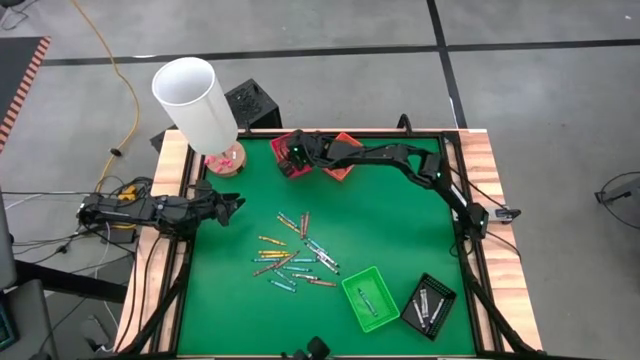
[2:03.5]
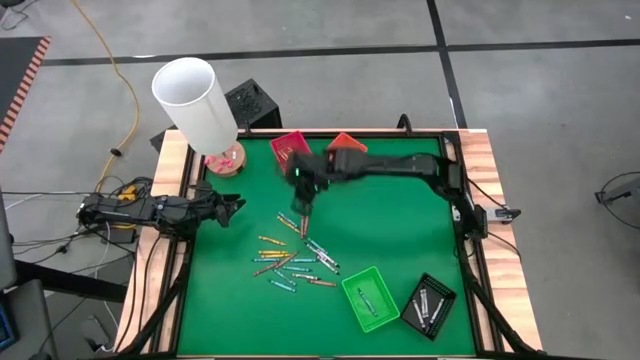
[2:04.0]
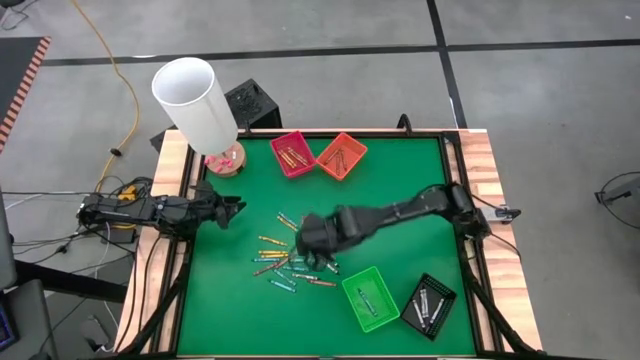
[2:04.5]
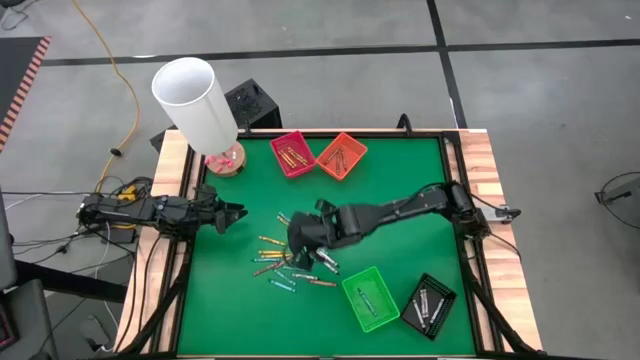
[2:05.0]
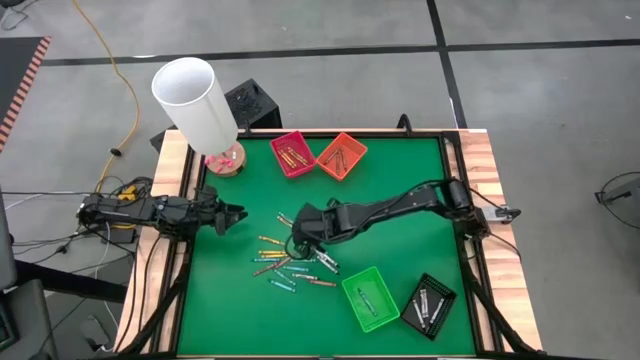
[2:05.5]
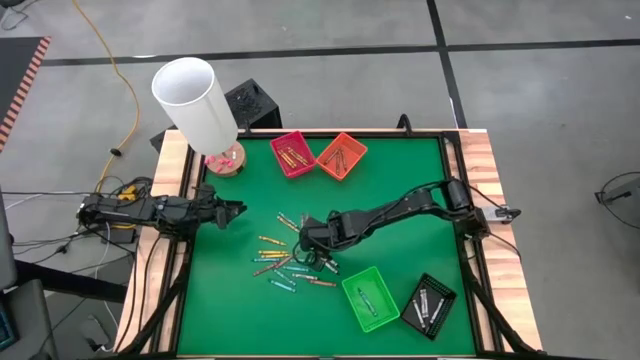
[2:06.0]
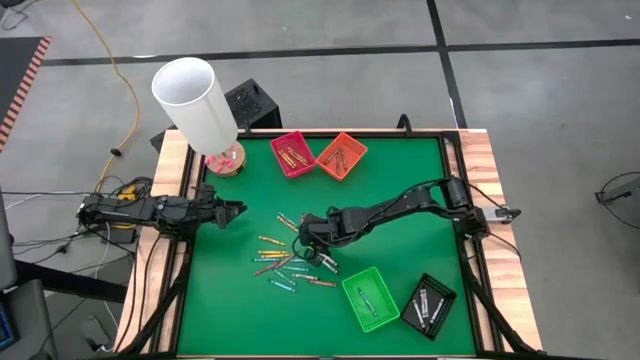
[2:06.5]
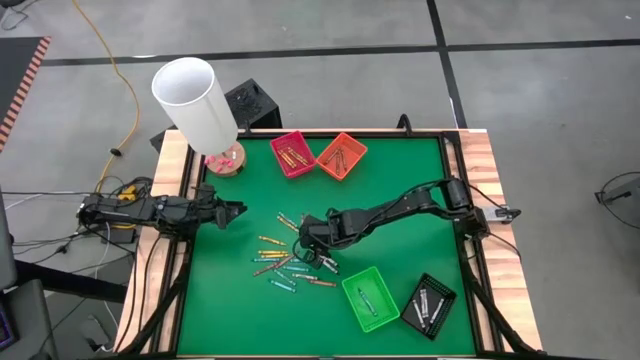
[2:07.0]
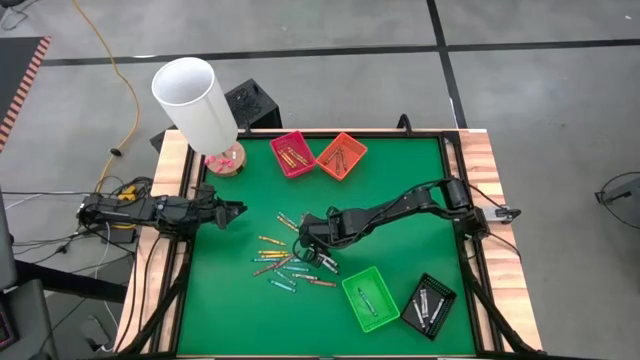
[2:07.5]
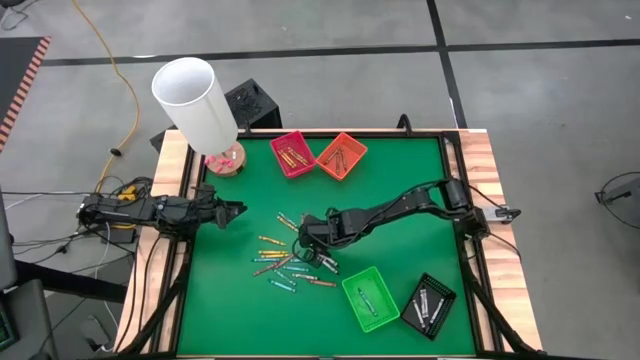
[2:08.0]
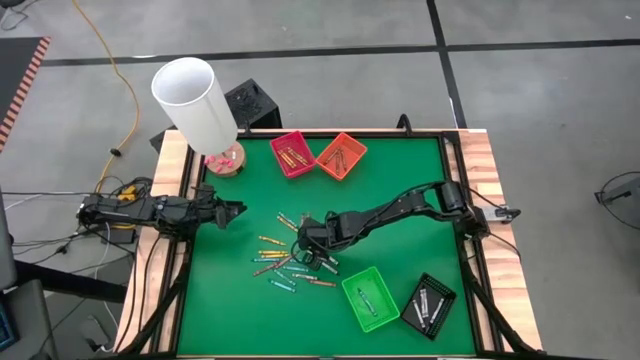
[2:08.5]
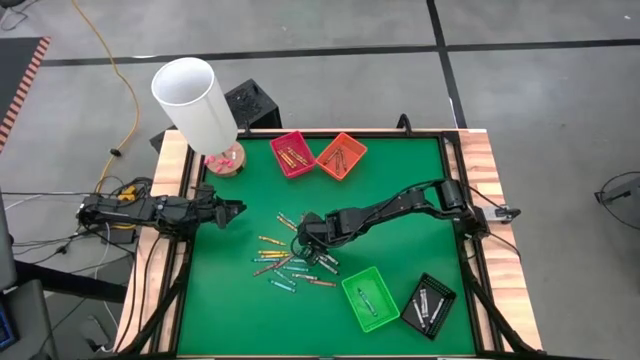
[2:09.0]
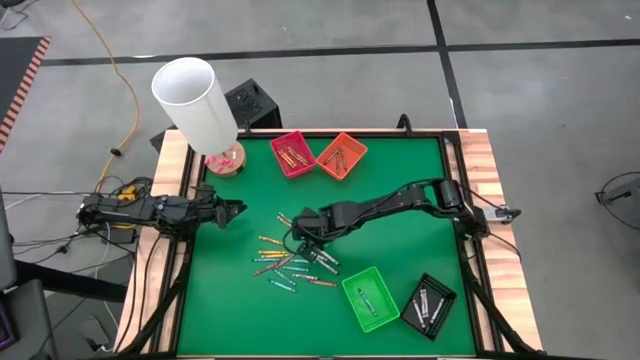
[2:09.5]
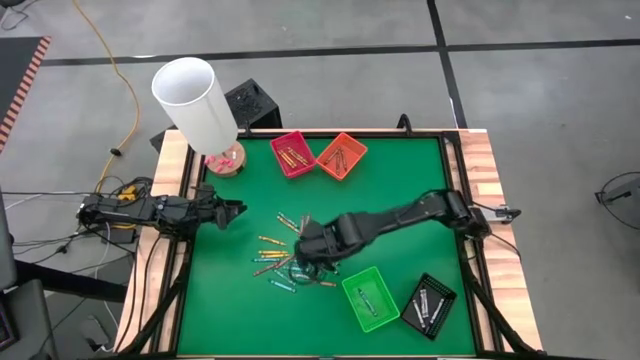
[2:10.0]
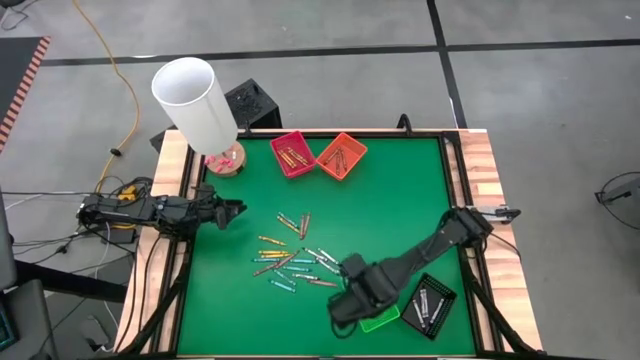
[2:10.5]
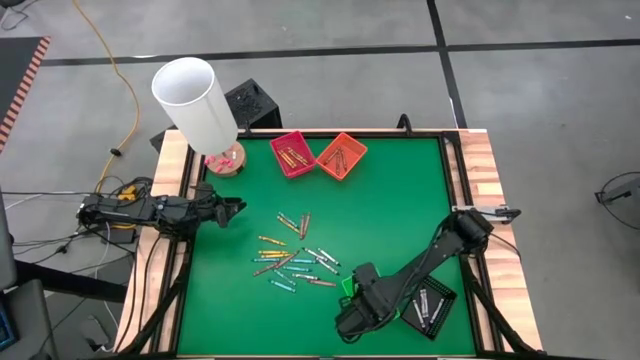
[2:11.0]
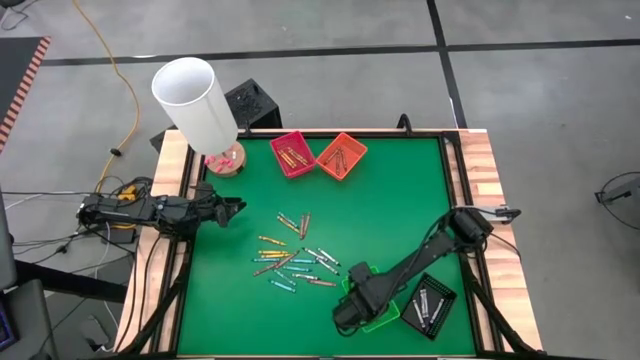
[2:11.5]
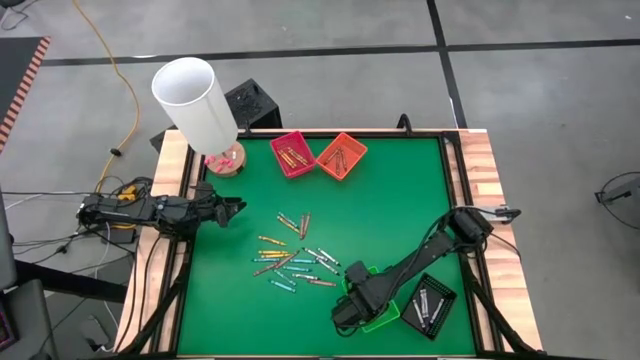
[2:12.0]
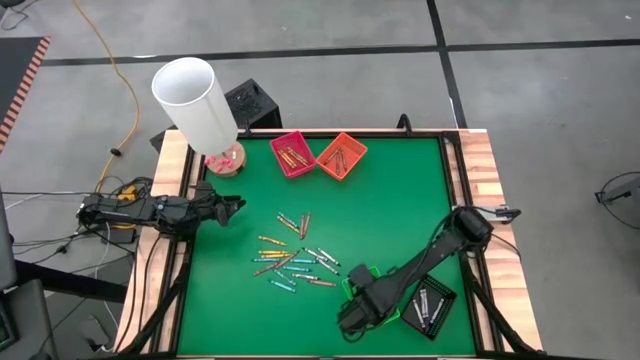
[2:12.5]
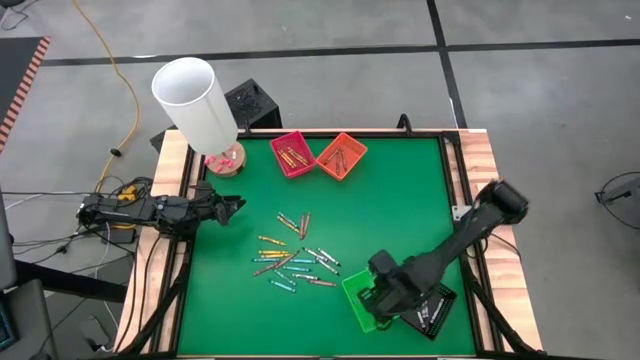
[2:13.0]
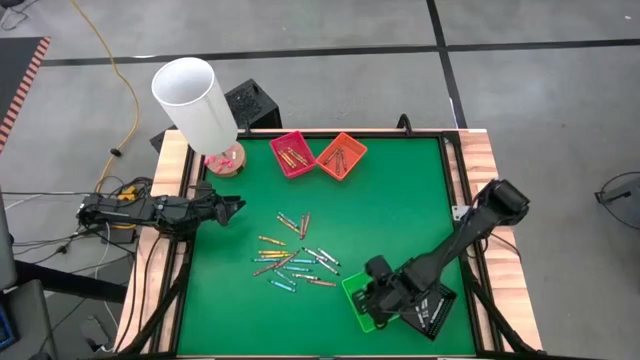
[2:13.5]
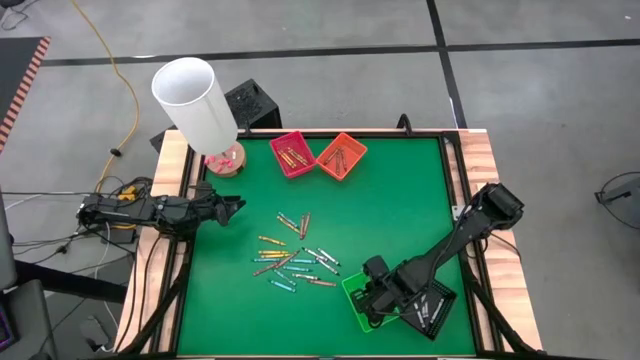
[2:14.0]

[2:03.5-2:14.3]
Task: Sort crayons
Put the green crayon into the green bin

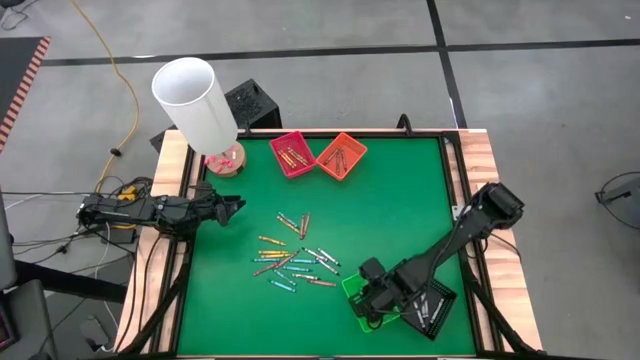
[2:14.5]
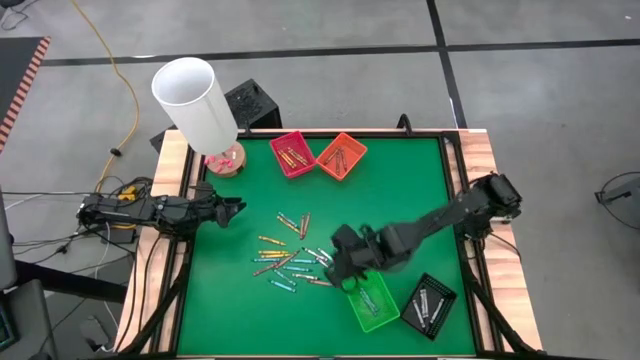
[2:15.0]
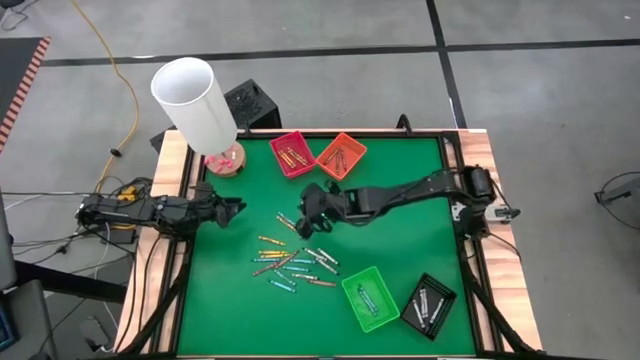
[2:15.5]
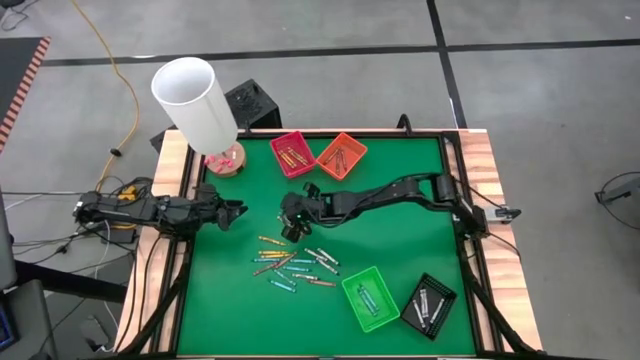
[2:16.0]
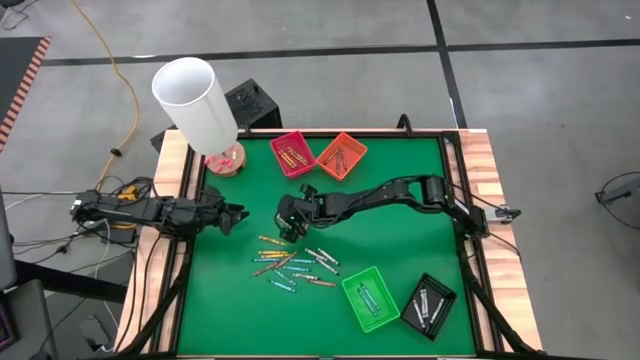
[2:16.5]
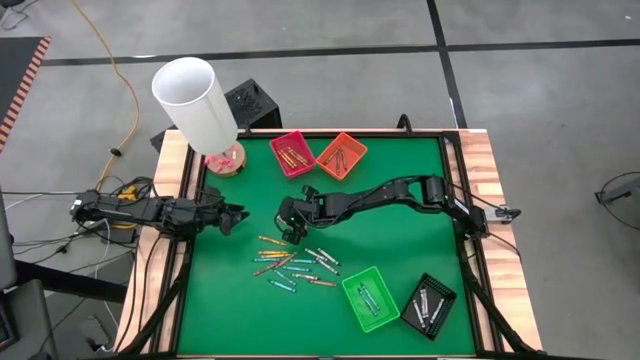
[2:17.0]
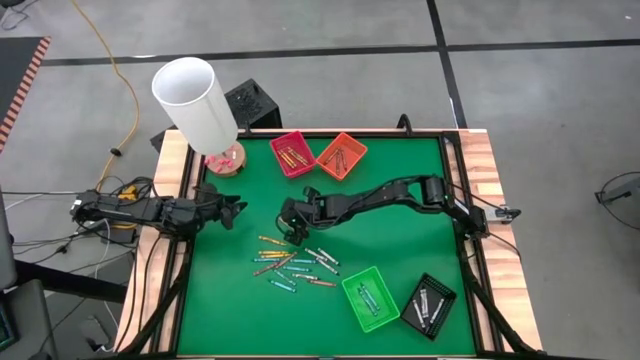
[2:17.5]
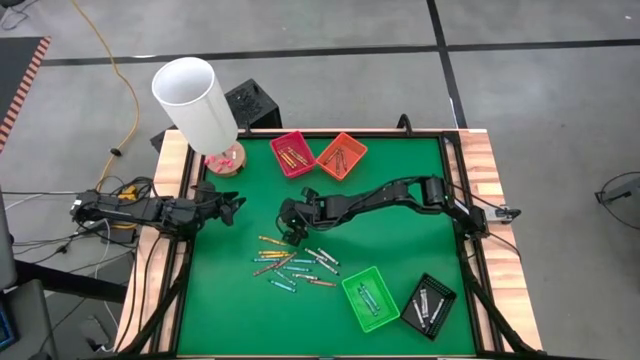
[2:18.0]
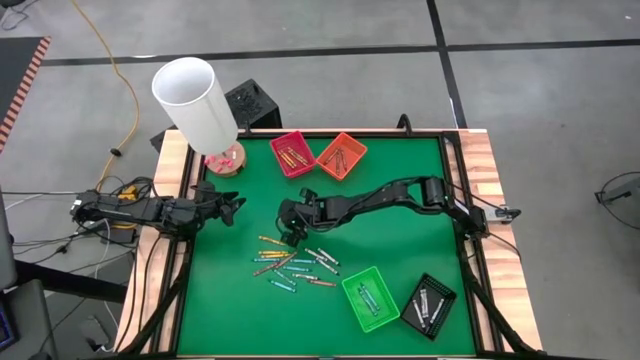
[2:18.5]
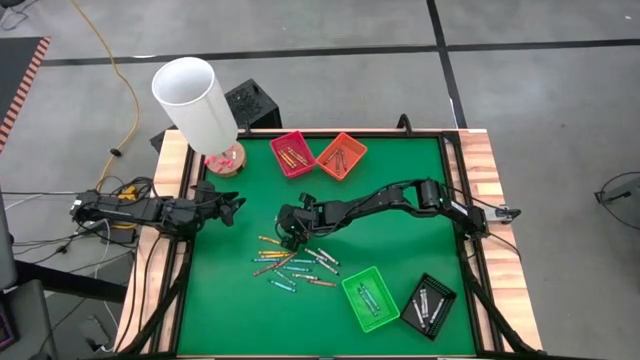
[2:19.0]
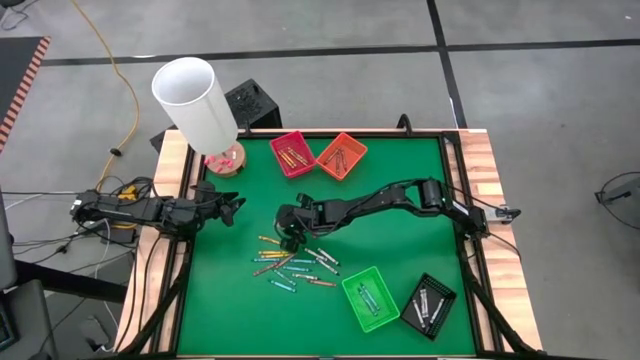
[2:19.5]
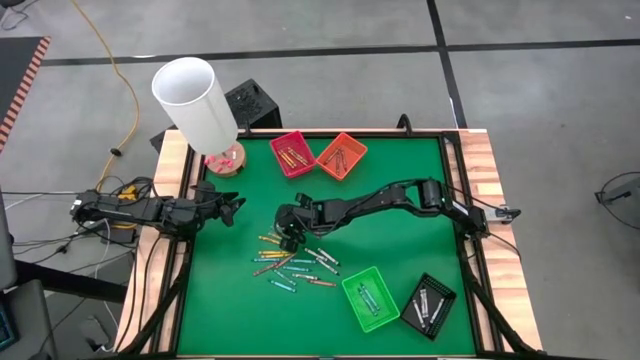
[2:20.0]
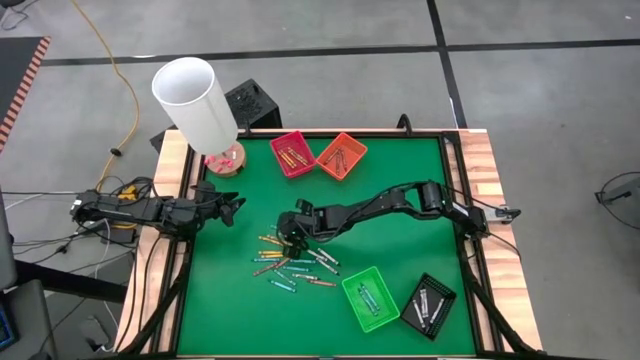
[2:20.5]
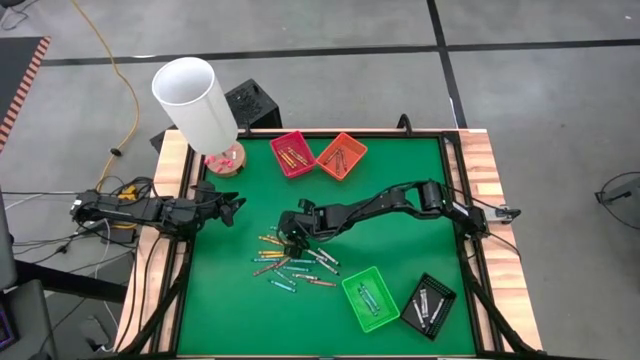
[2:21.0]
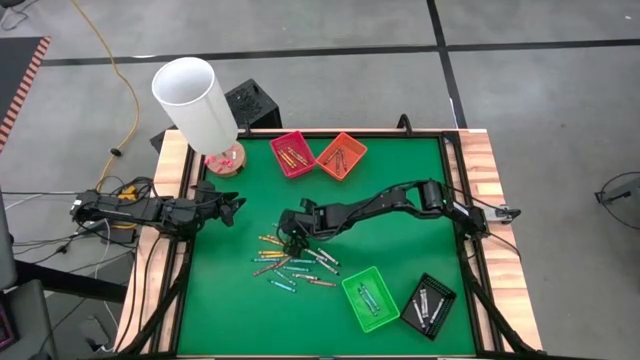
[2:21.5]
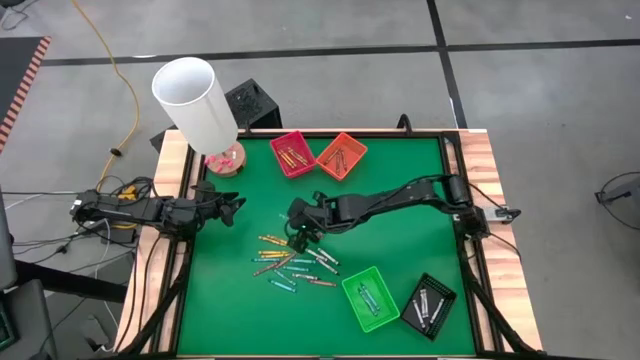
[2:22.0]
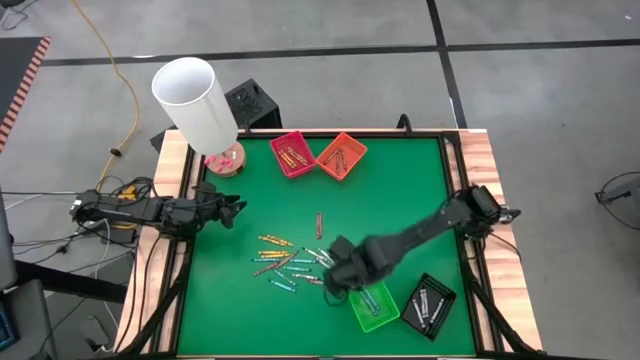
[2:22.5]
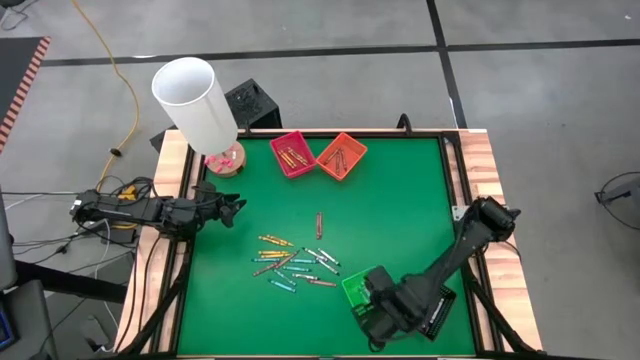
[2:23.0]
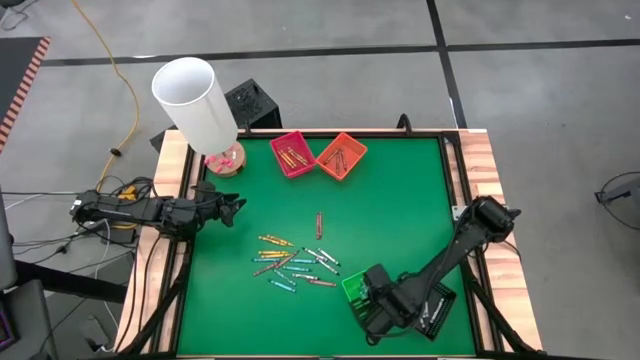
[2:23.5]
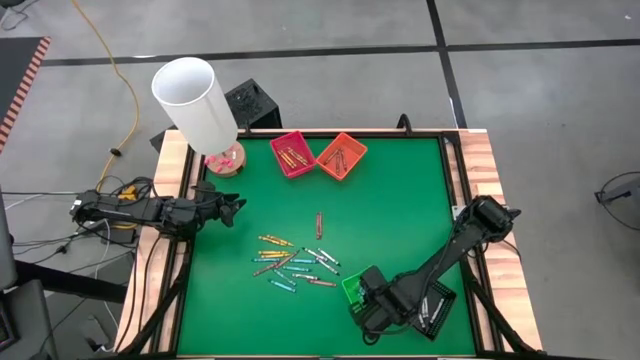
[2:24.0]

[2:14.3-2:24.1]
Put the green crayon into the green bin

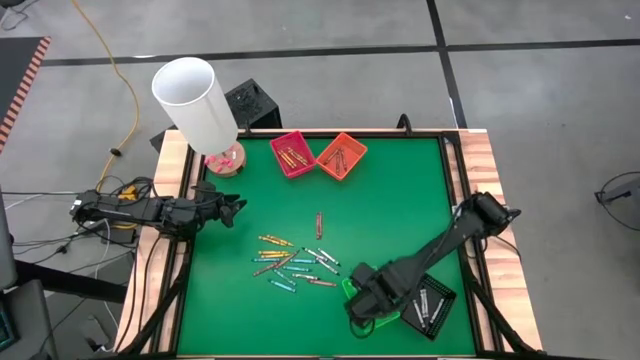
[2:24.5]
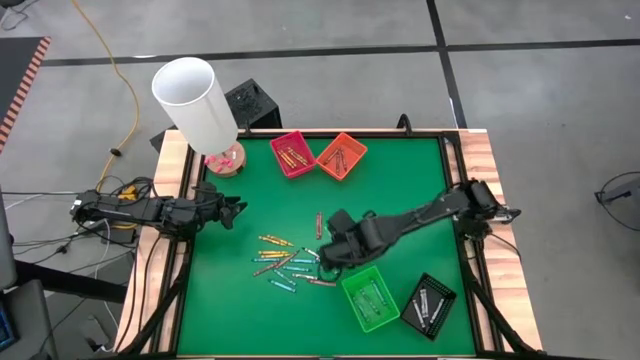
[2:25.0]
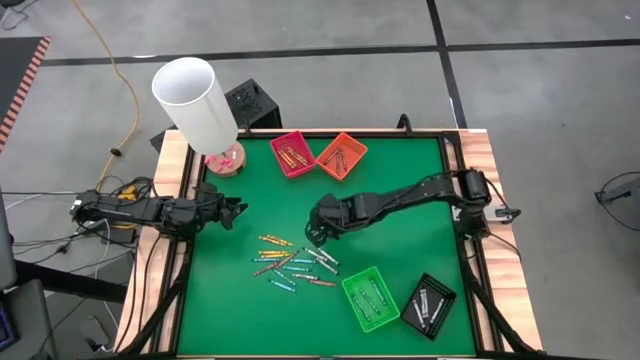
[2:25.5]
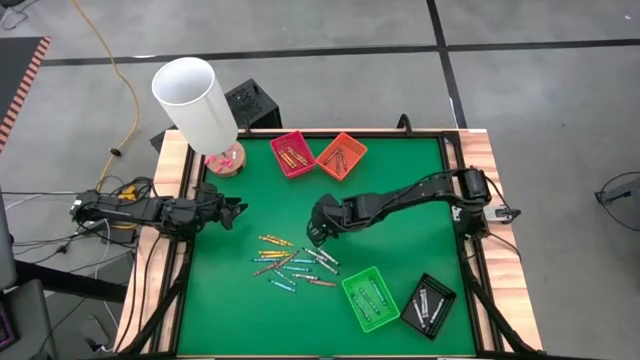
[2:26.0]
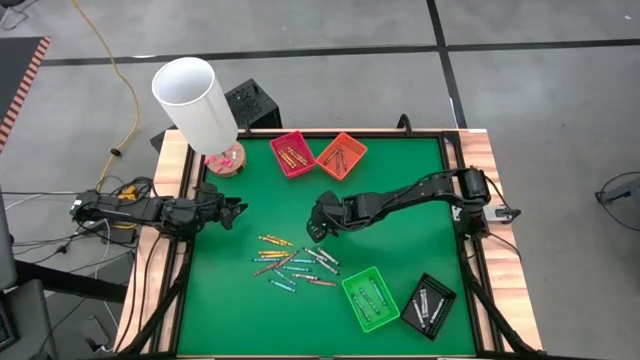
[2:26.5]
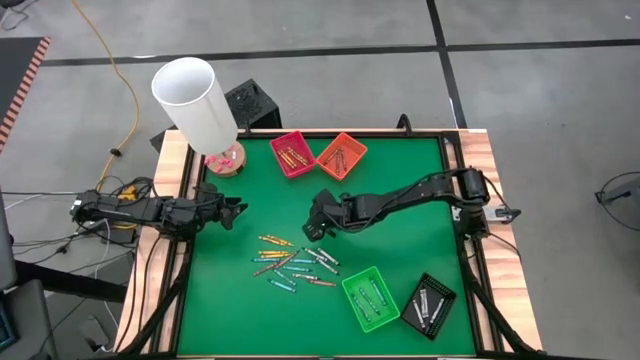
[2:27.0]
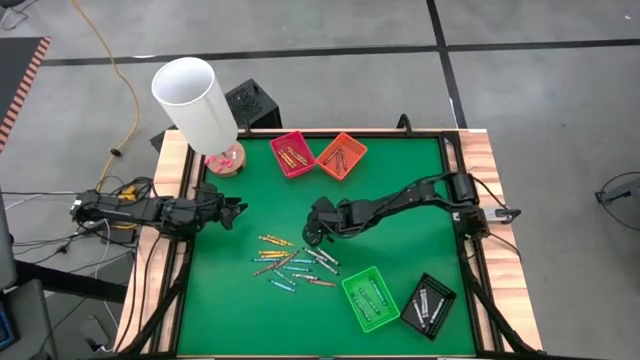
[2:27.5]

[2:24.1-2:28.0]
Put the brown crayon into the orange bin
